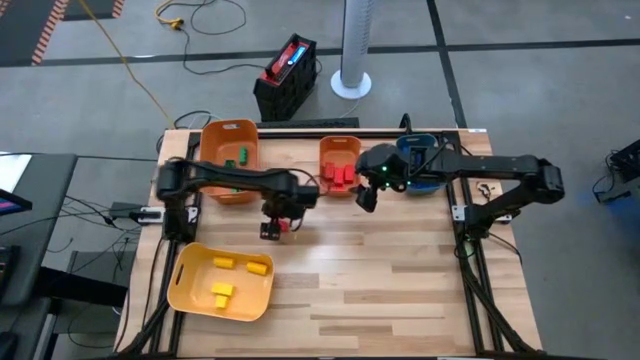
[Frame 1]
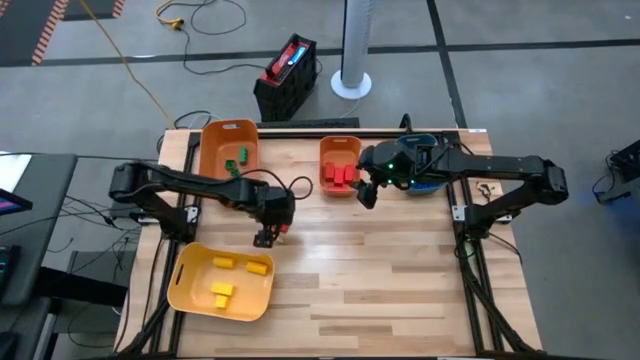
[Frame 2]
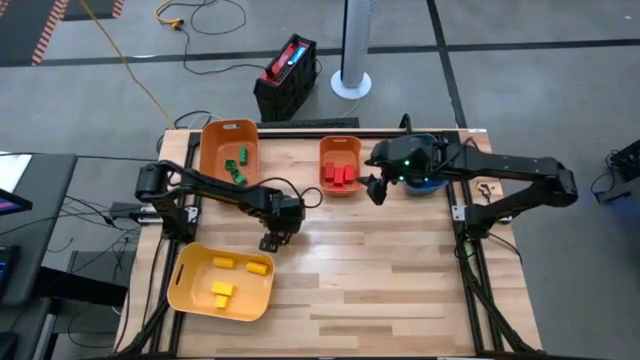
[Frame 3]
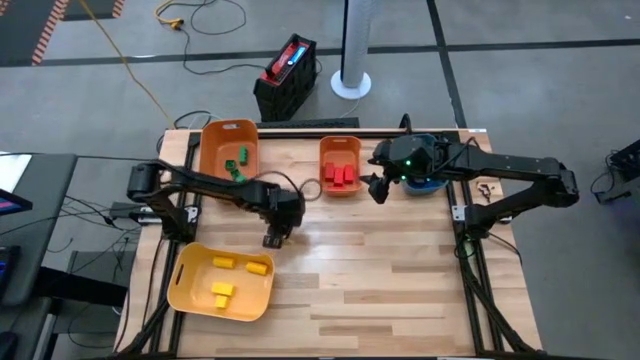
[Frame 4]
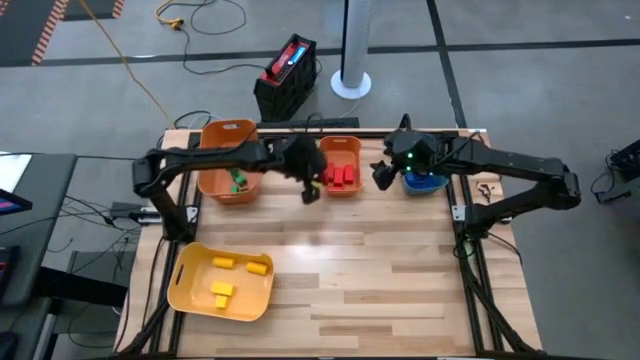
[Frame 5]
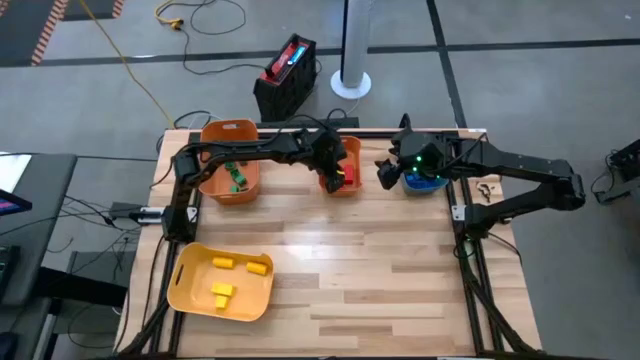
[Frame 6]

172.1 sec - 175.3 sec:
Task: Sort blocks
Put the red block into the right orange bin

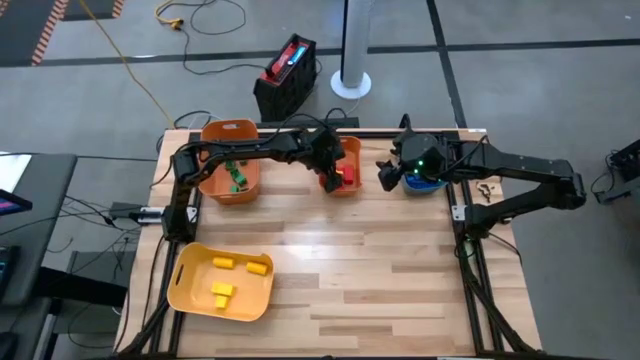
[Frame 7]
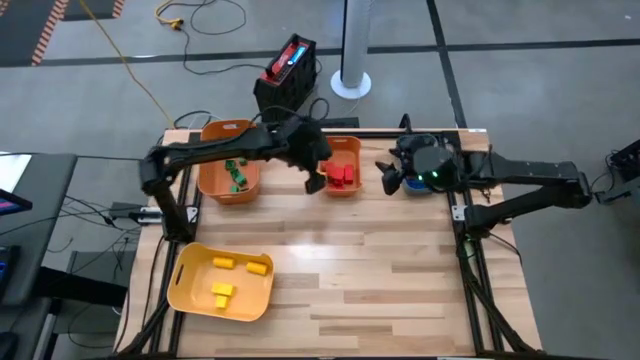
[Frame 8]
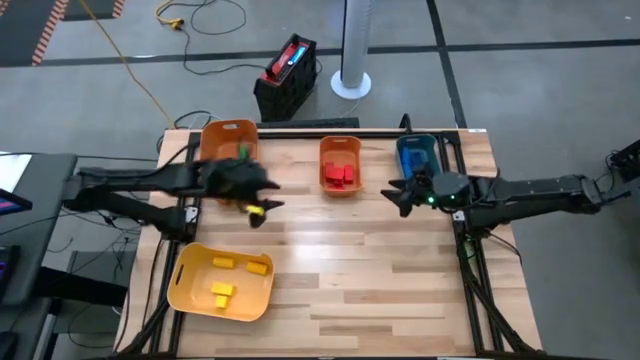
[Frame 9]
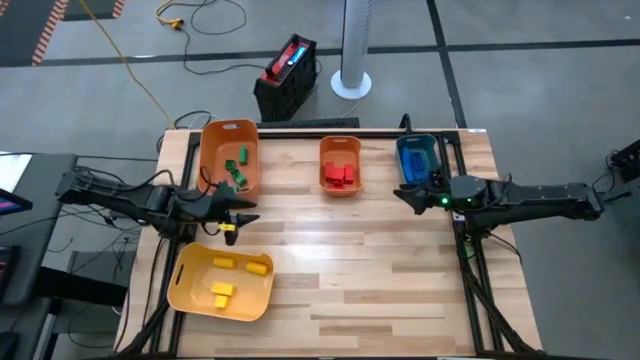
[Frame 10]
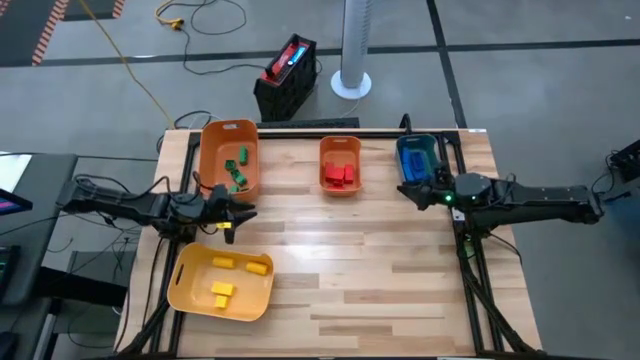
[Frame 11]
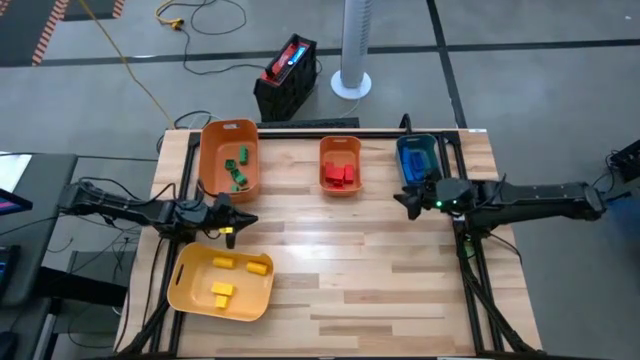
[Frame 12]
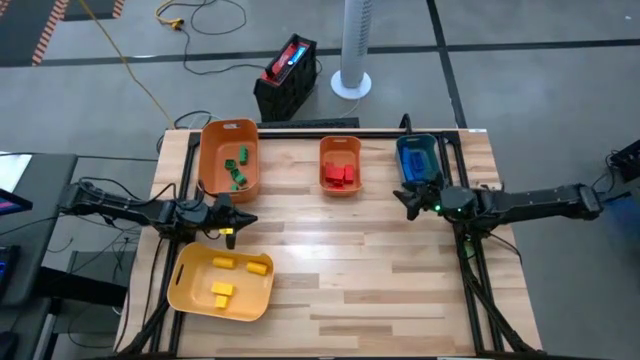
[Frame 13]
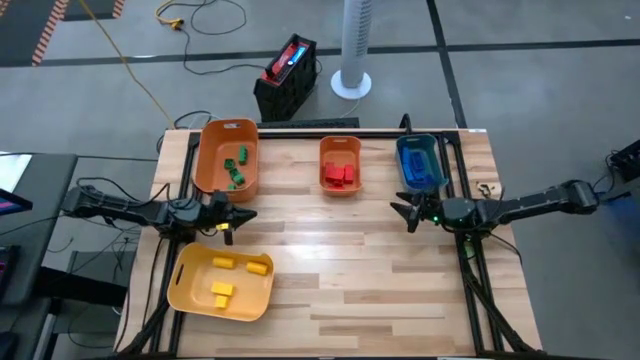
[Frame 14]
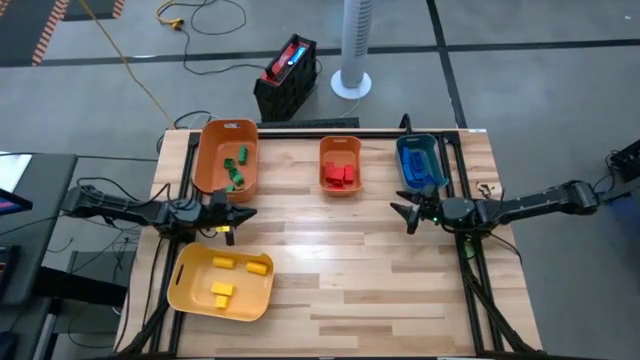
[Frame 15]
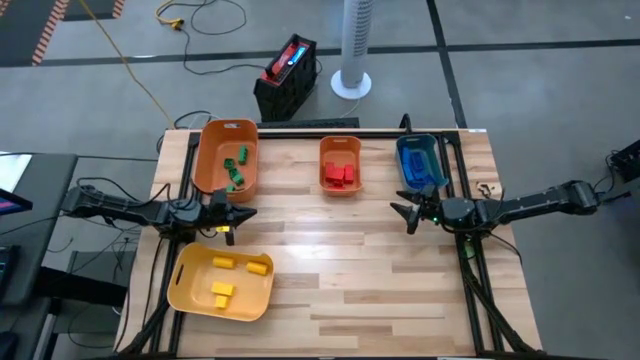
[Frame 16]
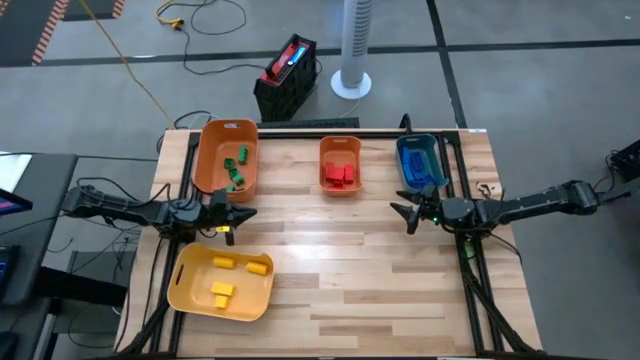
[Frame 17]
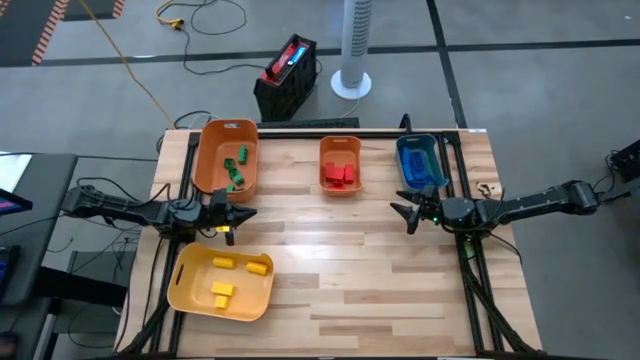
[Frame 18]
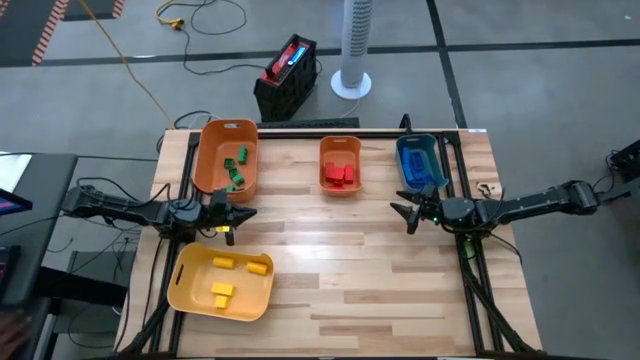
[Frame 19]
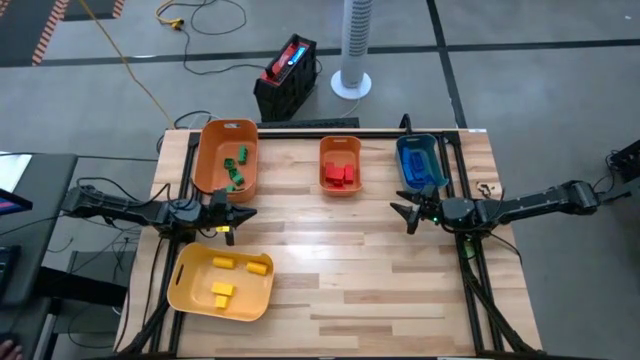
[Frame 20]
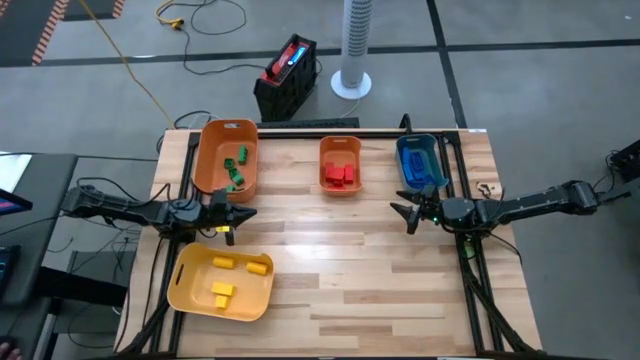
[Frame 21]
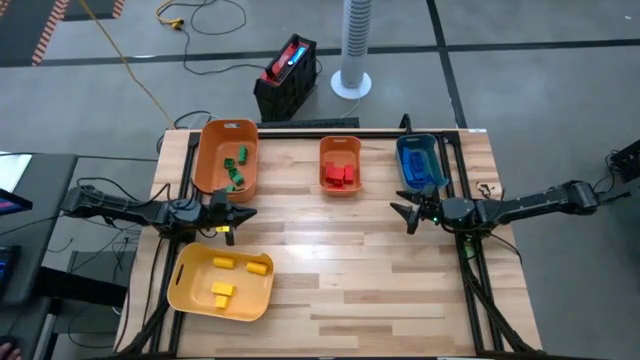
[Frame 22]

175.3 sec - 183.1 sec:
Return to Home Position

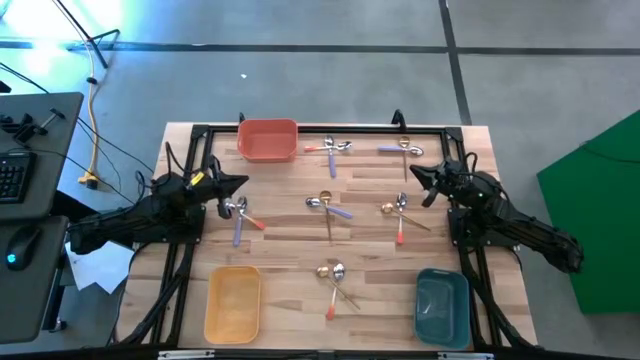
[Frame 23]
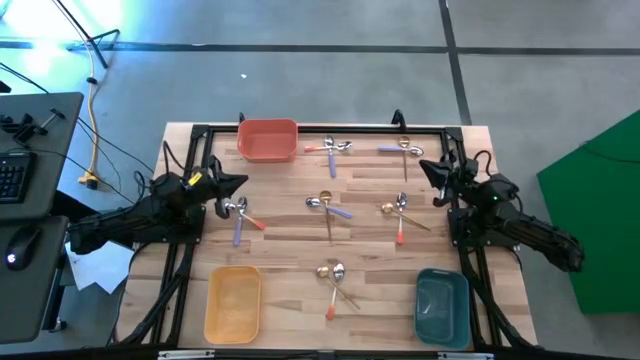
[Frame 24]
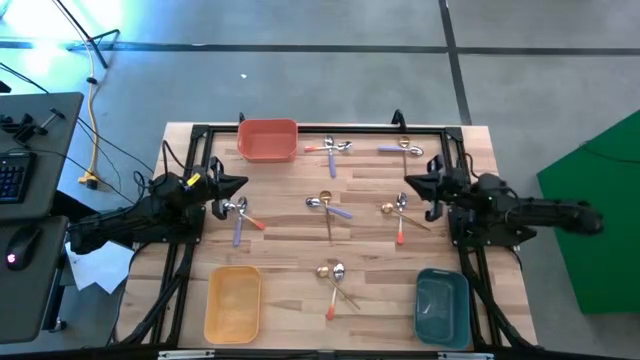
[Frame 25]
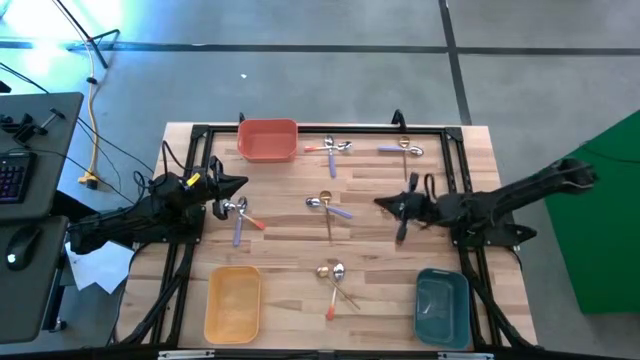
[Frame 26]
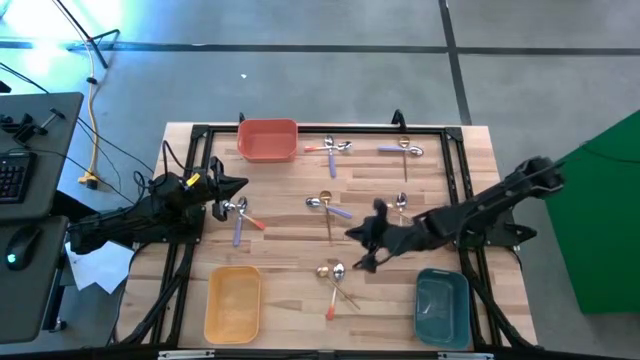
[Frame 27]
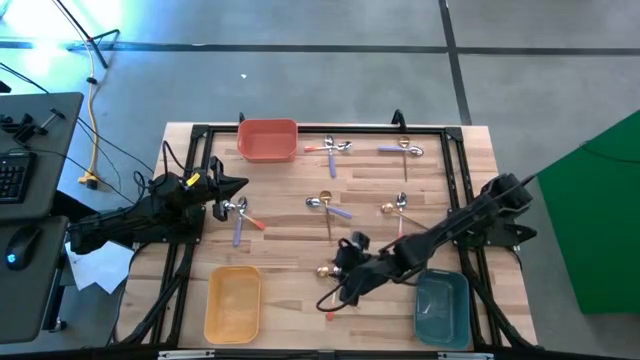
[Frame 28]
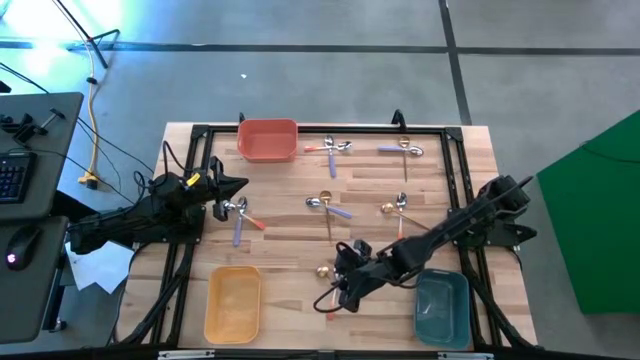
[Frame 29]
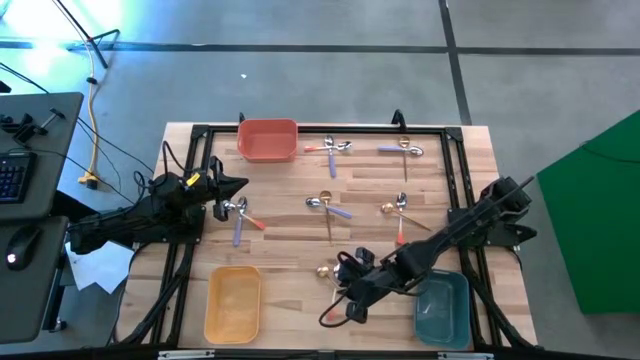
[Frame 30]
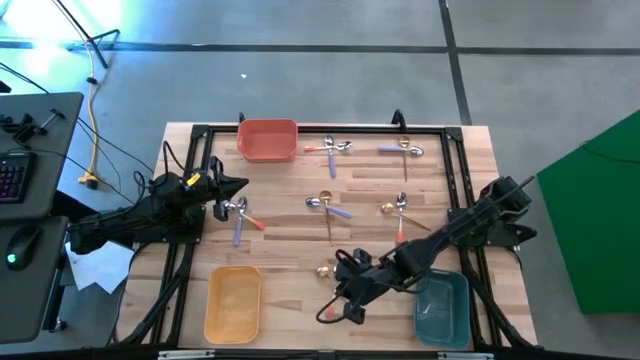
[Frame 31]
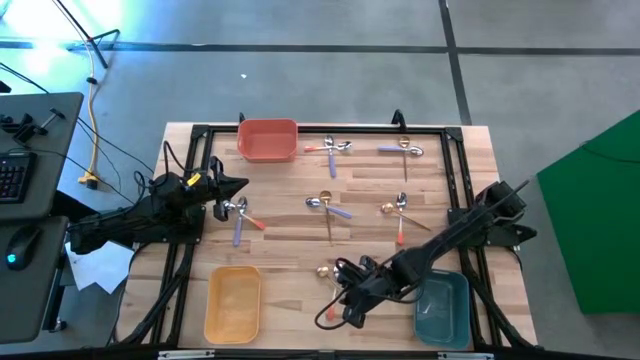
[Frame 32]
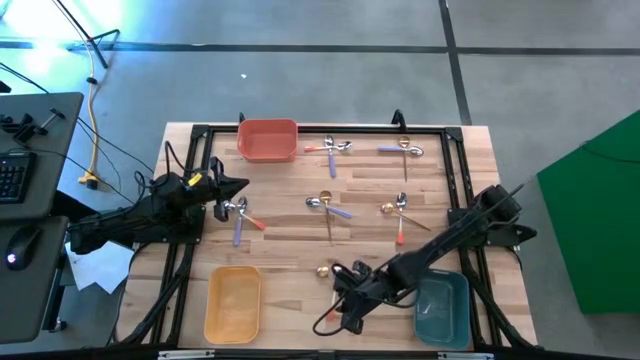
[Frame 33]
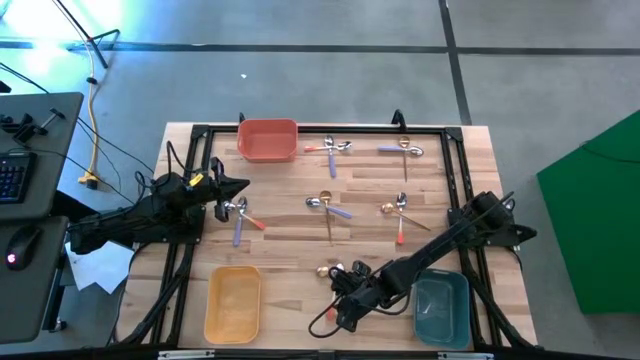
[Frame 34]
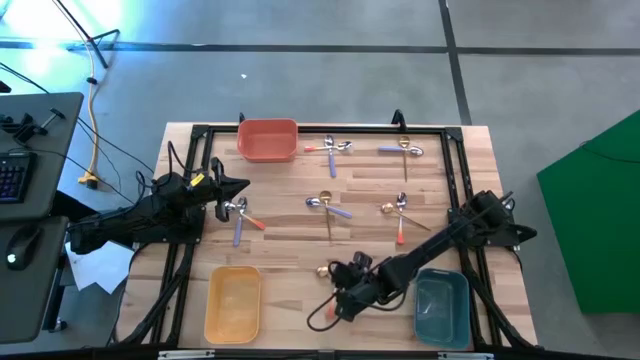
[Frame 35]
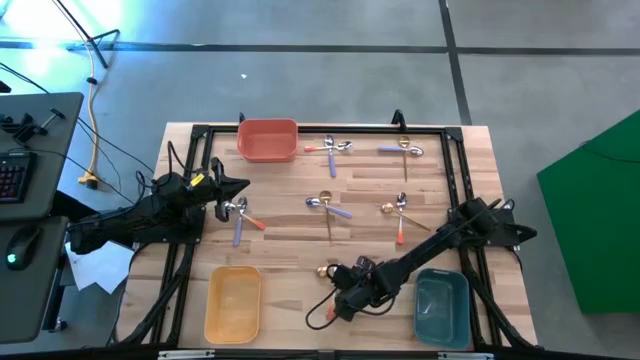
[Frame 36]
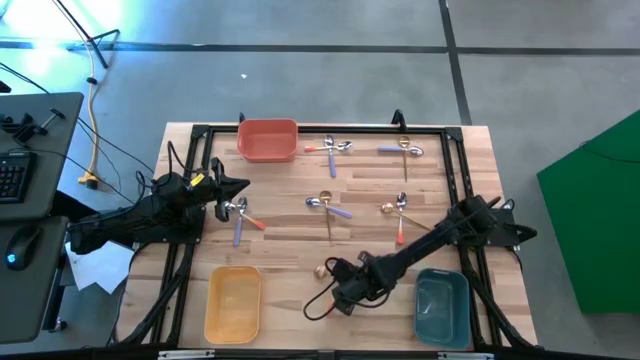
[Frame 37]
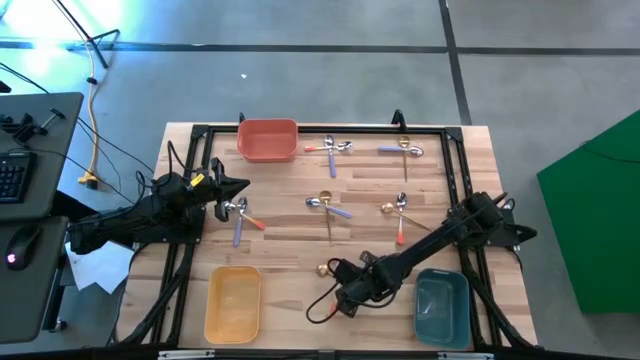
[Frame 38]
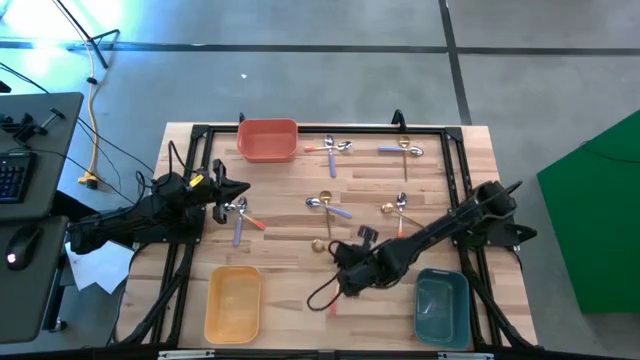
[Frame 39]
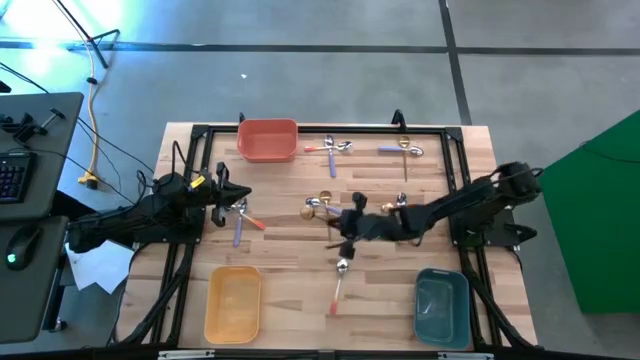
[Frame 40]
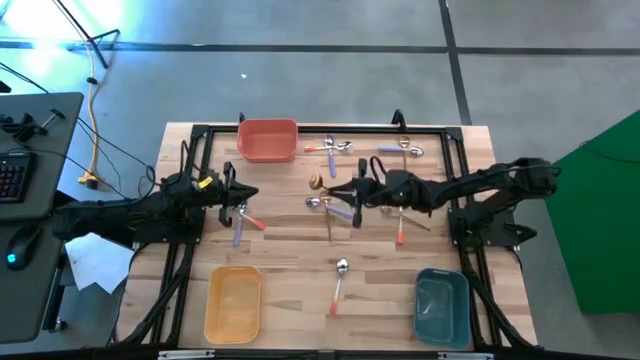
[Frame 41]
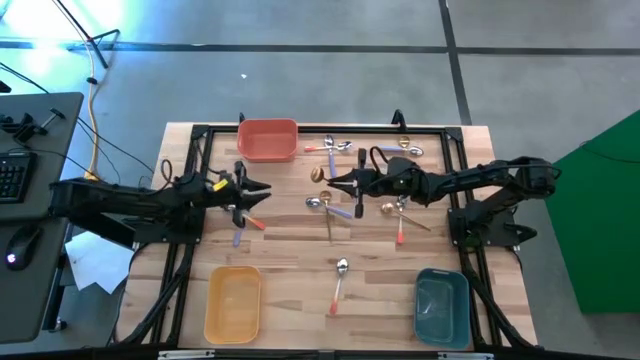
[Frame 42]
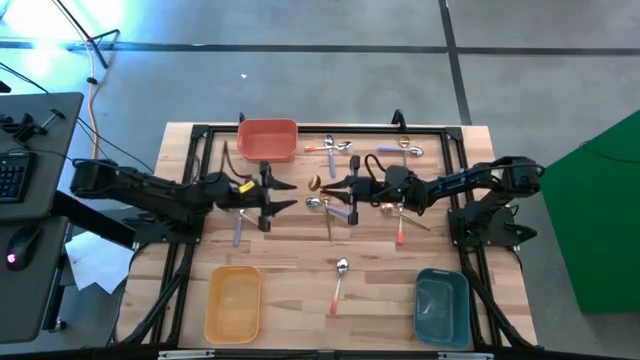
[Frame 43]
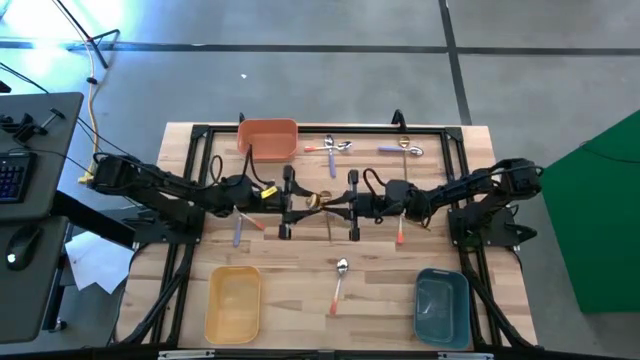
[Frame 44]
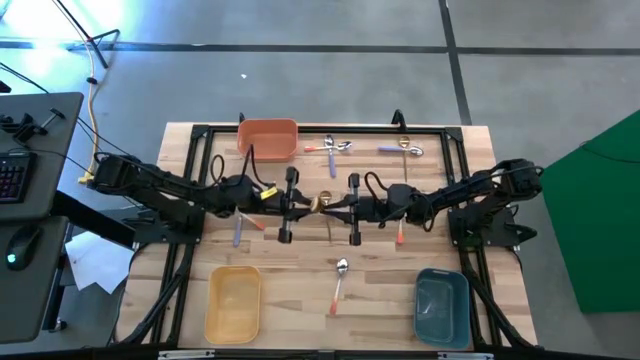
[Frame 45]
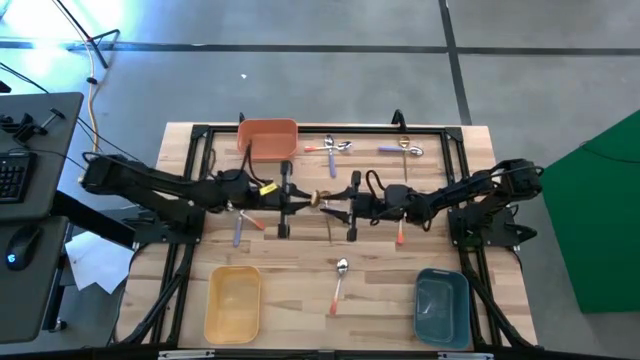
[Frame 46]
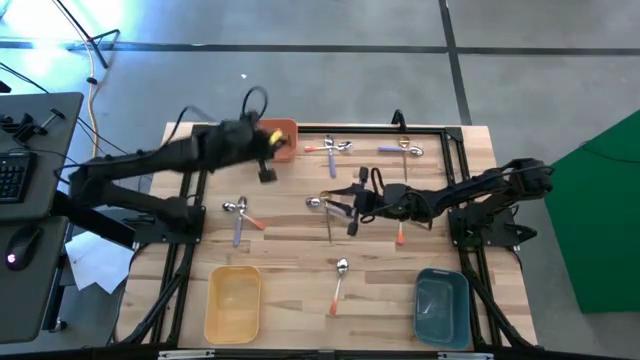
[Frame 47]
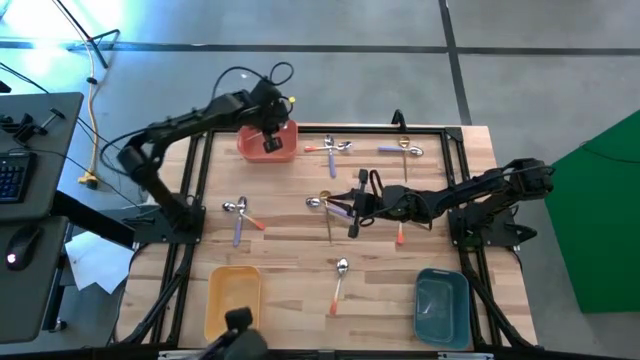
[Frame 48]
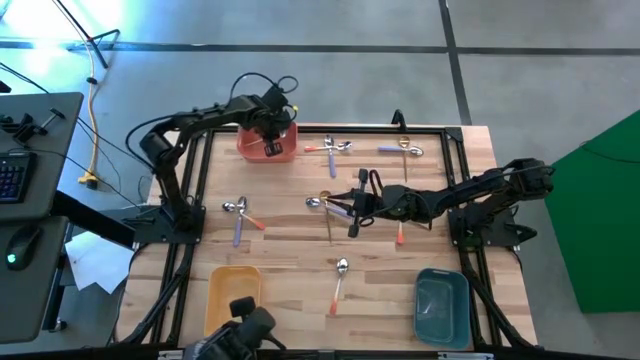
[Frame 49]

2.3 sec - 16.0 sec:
Task: Sort silverware by color (type)
Put the bottom gold spoon into the orange bin
